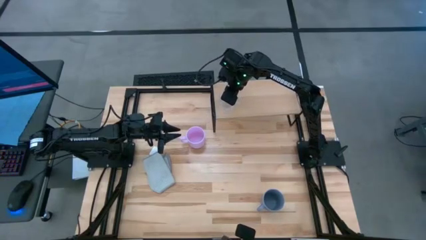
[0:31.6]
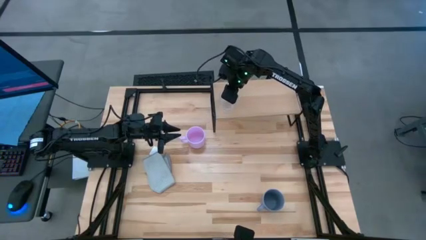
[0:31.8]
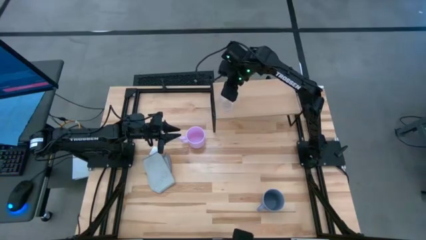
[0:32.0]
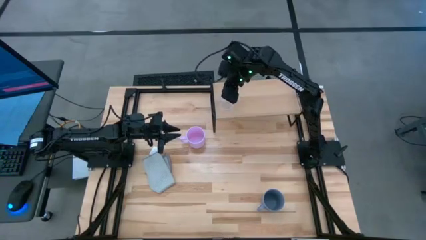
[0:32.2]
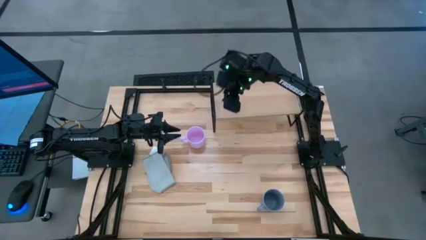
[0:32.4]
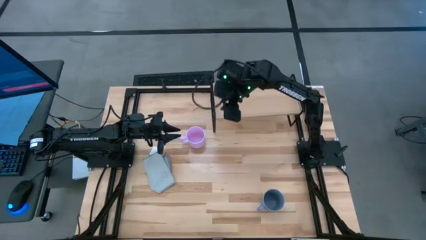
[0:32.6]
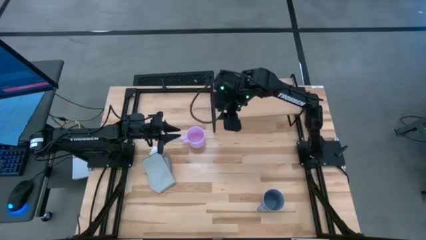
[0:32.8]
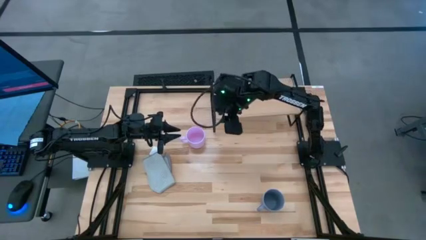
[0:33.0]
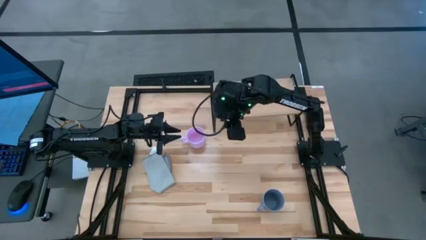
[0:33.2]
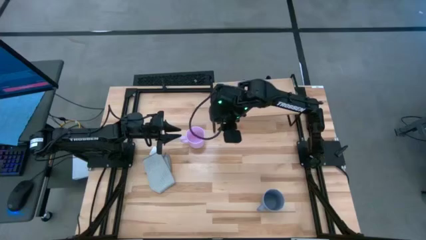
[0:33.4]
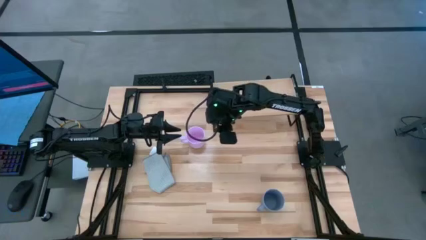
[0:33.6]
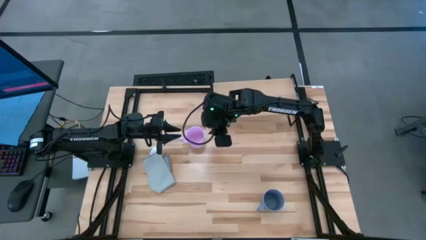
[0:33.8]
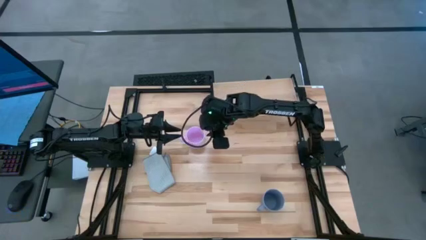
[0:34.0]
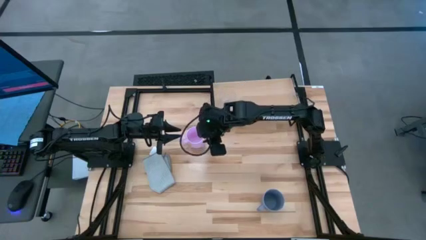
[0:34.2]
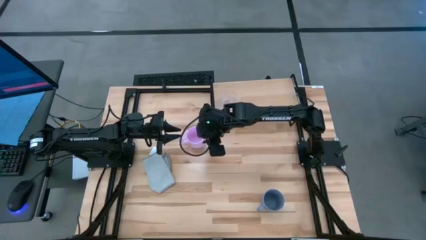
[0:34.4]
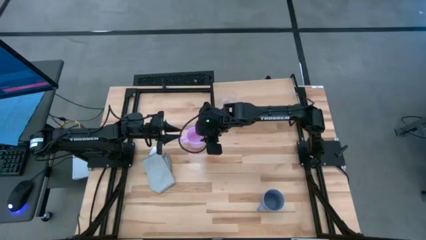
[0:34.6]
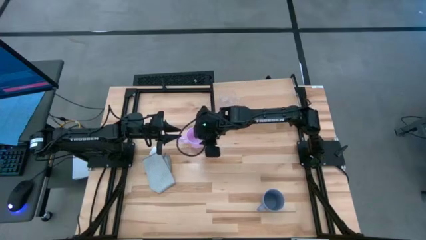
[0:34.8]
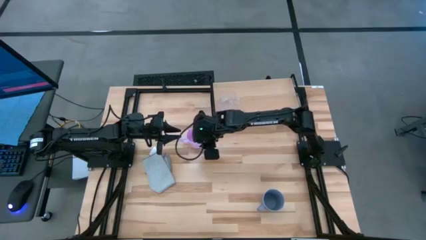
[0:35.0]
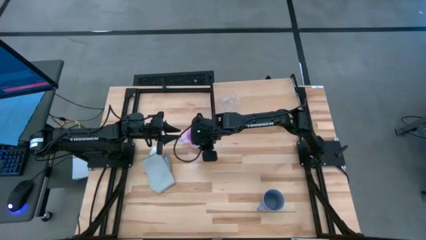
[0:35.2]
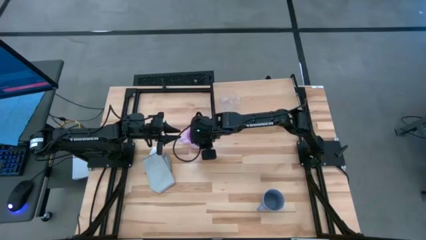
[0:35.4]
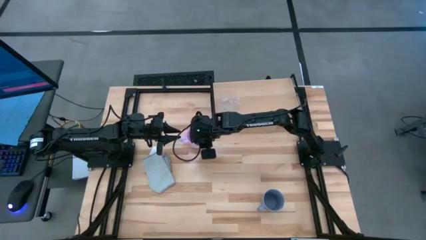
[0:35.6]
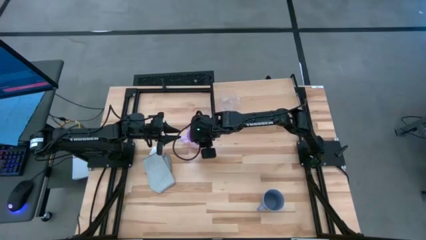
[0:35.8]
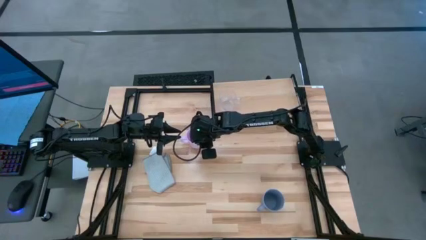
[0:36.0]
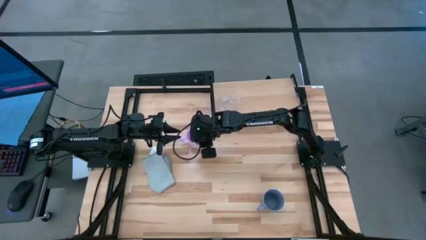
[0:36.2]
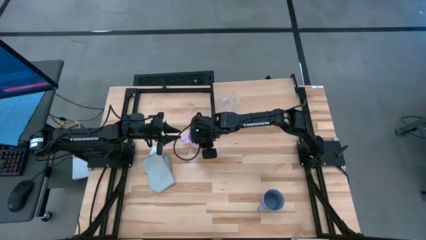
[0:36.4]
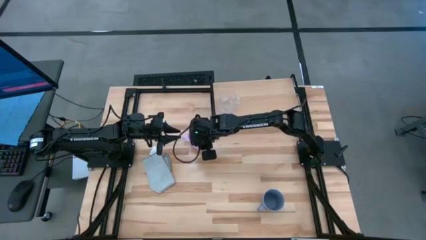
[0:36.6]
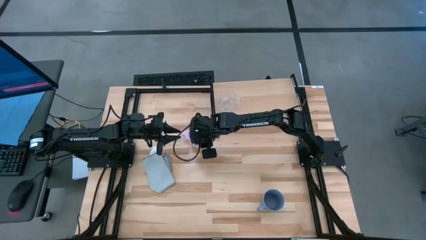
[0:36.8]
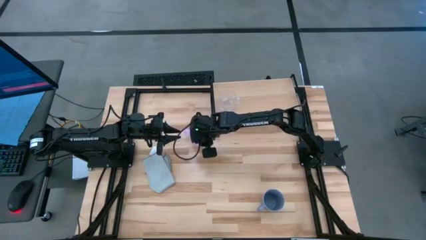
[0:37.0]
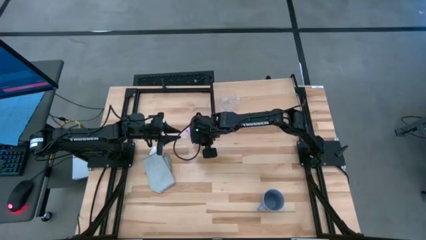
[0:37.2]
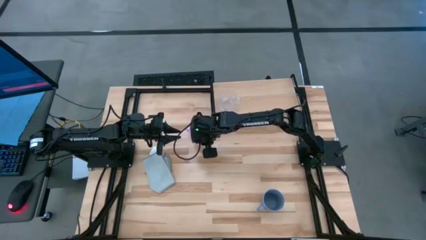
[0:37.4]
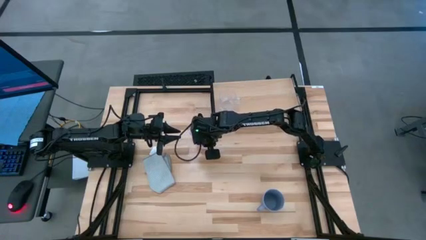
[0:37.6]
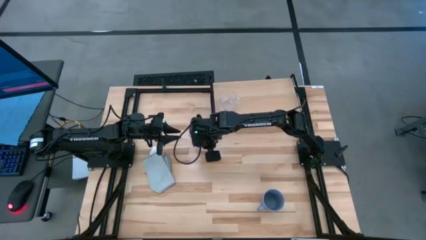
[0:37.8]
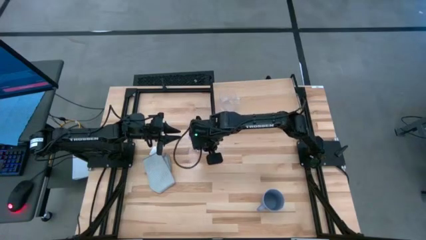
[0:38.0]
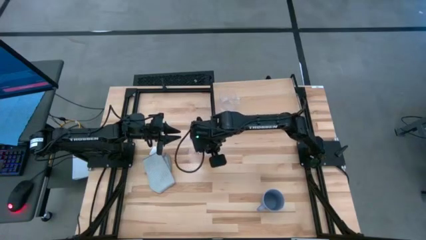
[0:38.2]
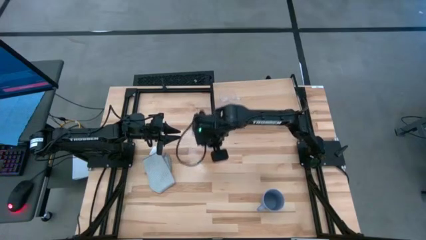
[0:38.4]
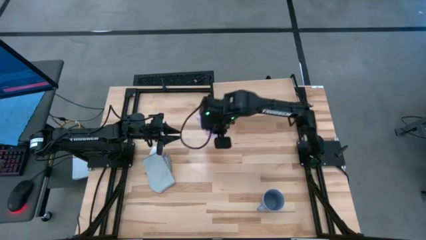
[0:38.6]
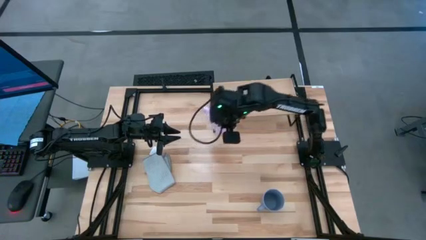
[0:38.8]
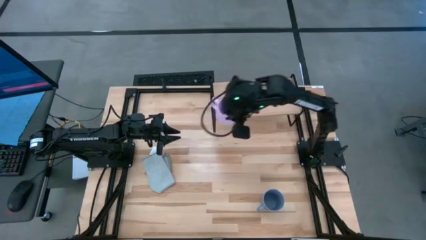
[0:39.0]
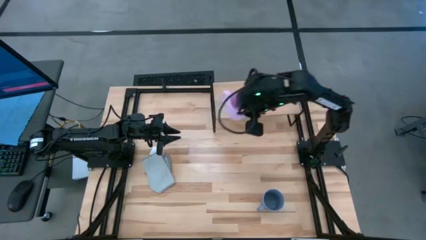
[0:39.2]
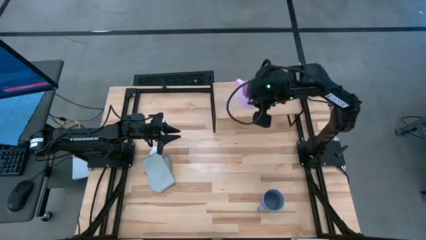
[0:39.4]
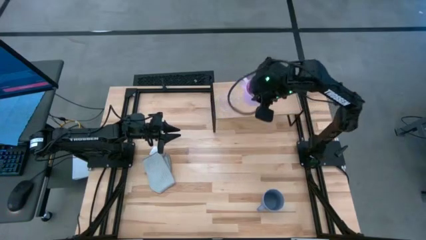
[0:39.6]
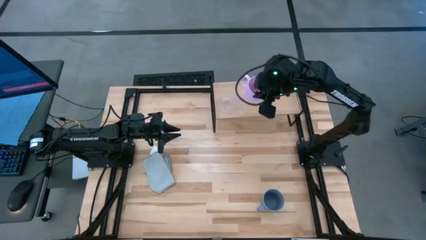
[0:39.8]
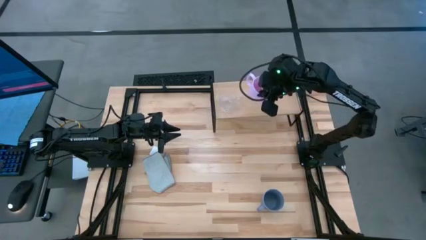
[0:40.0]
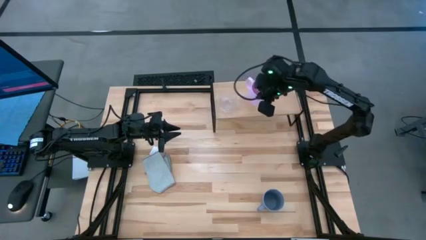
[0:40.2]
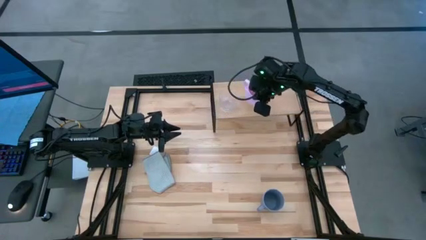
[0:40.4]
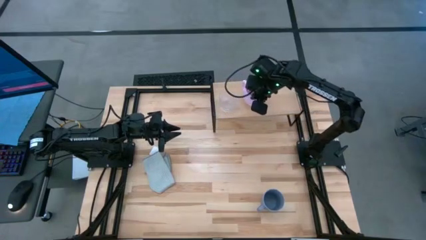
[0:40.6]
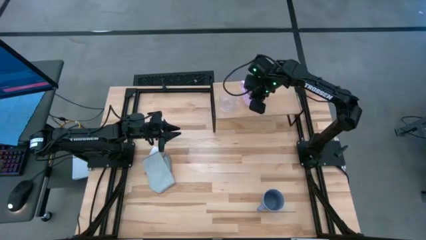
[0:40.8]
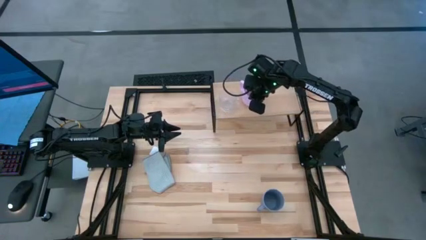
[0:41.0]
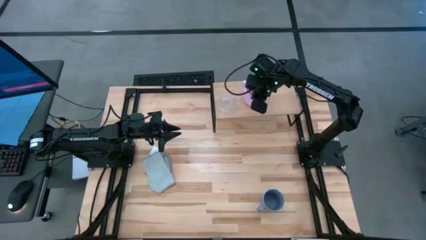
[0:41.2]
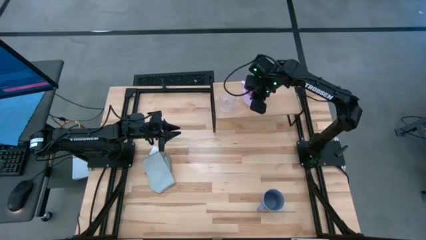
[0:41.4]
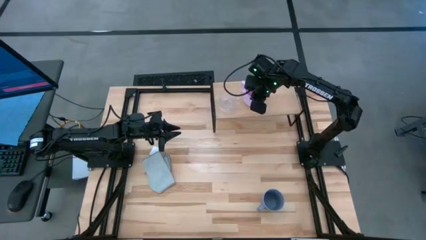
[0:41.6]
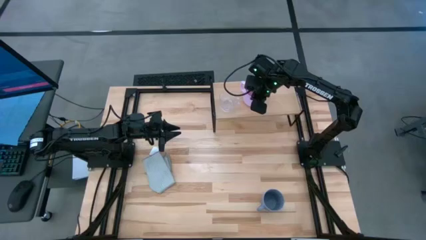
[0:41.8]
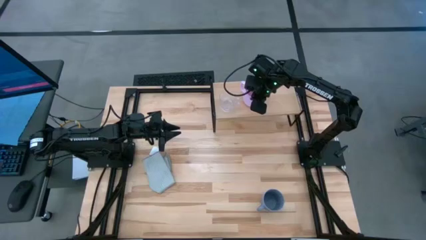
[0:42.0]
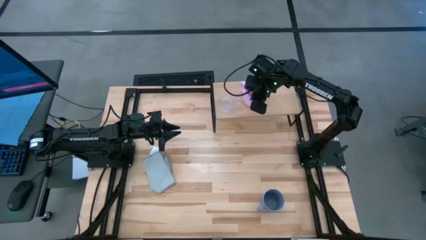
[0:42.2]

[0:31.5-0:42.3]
Task: Stack small to large cups/mugs on shelf
Put the pink mug on the shelf
